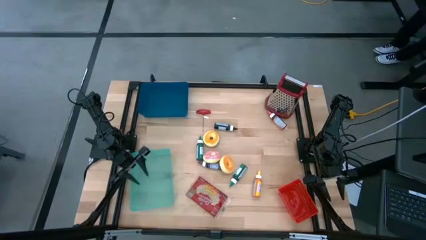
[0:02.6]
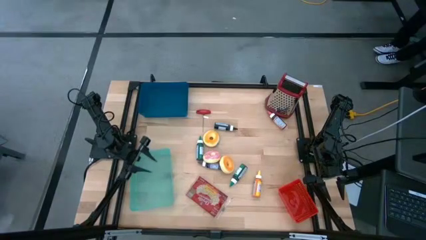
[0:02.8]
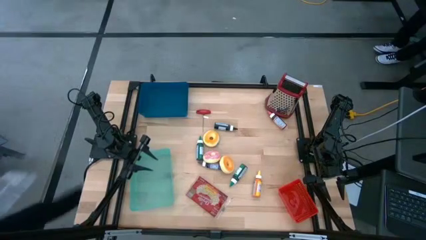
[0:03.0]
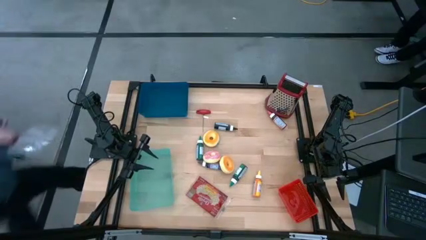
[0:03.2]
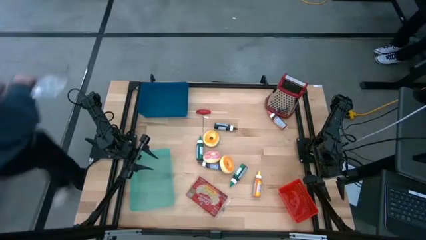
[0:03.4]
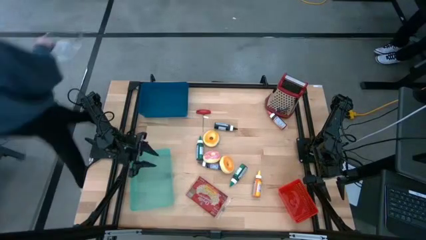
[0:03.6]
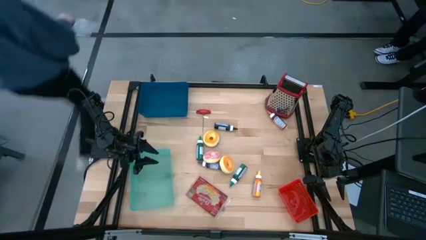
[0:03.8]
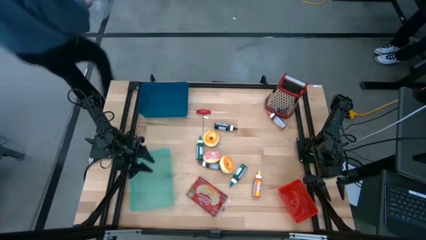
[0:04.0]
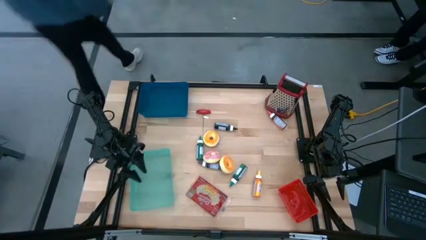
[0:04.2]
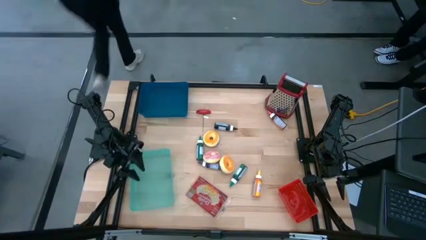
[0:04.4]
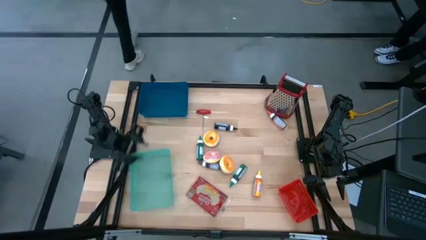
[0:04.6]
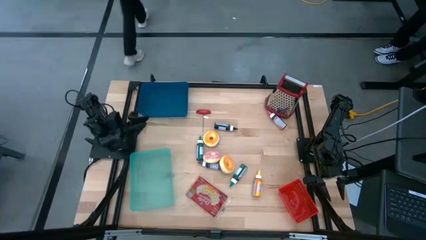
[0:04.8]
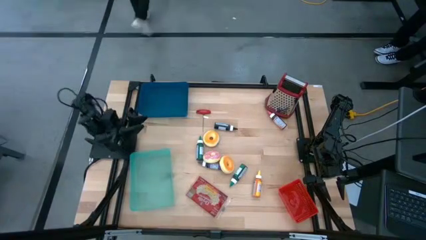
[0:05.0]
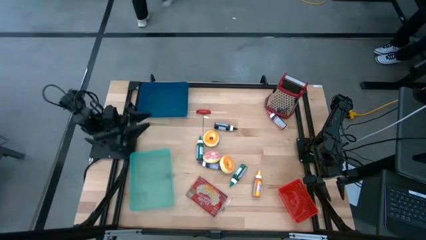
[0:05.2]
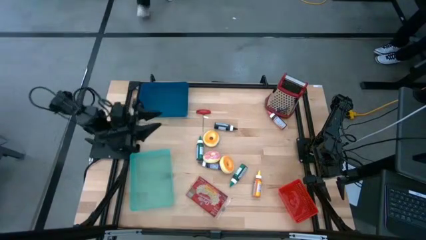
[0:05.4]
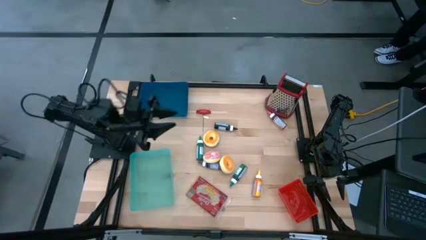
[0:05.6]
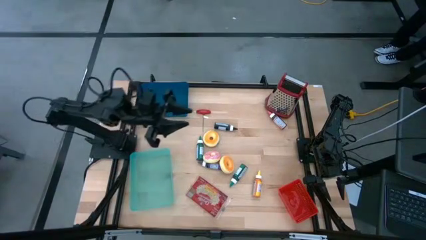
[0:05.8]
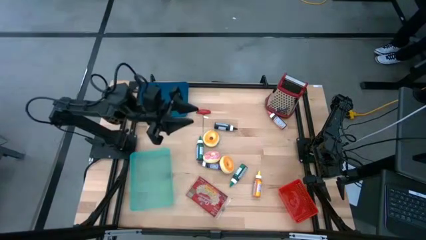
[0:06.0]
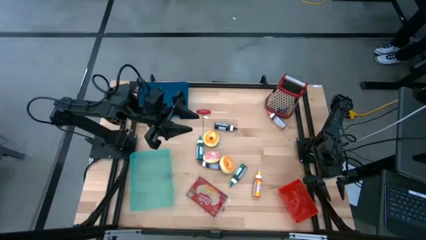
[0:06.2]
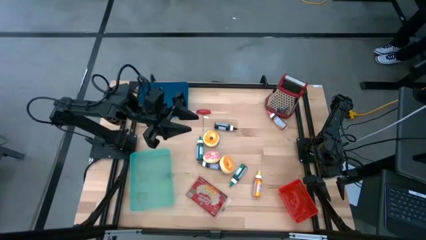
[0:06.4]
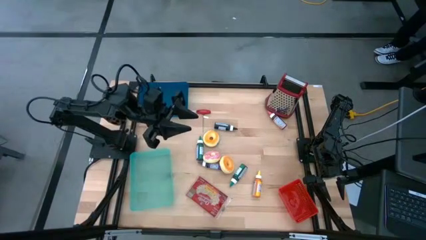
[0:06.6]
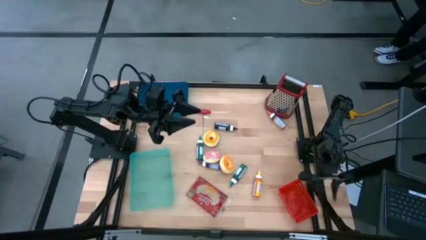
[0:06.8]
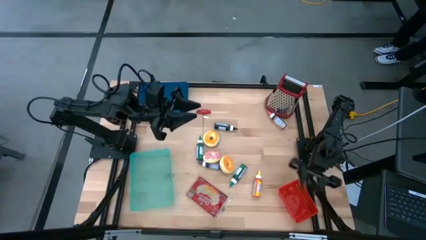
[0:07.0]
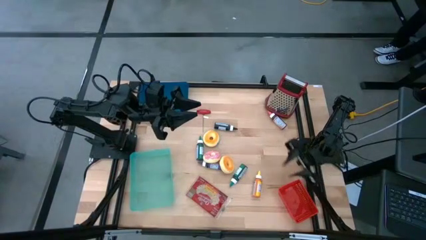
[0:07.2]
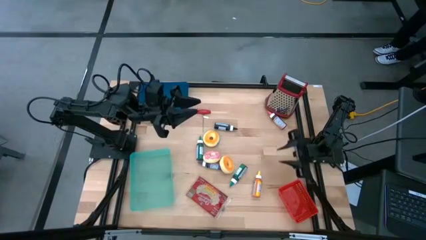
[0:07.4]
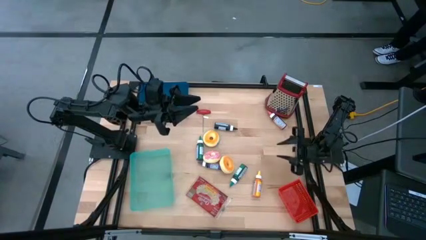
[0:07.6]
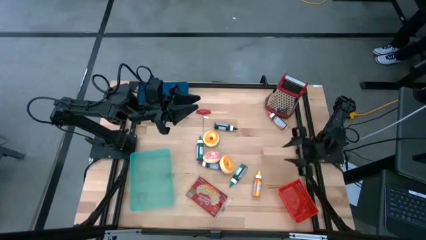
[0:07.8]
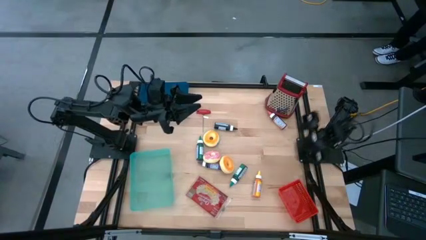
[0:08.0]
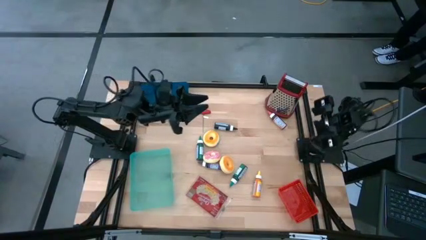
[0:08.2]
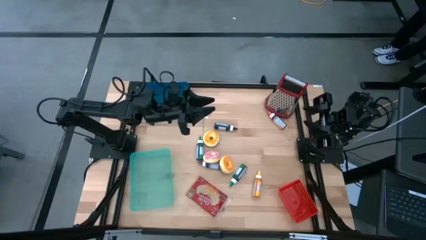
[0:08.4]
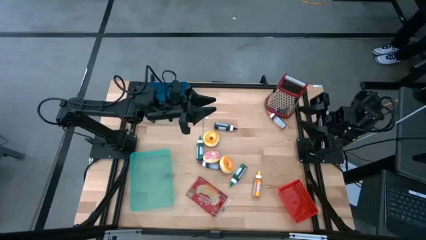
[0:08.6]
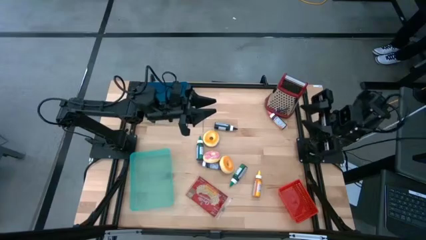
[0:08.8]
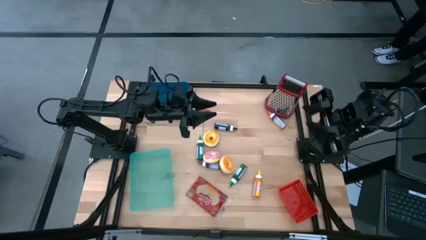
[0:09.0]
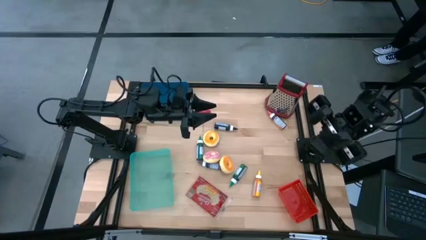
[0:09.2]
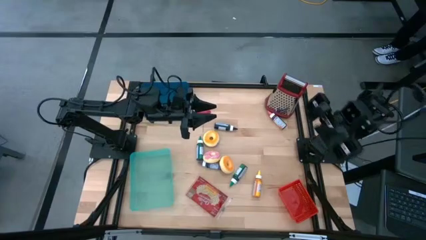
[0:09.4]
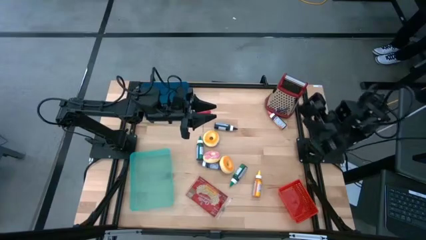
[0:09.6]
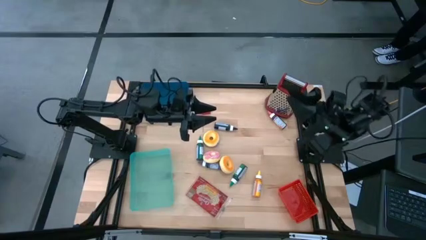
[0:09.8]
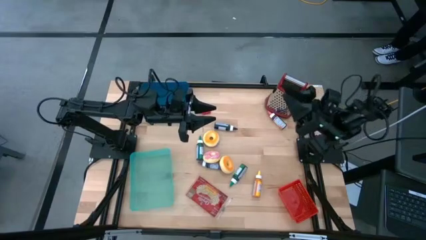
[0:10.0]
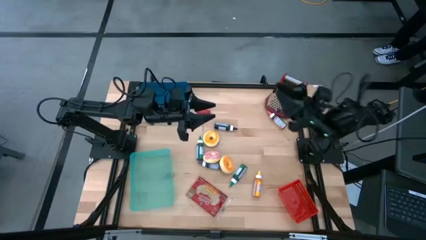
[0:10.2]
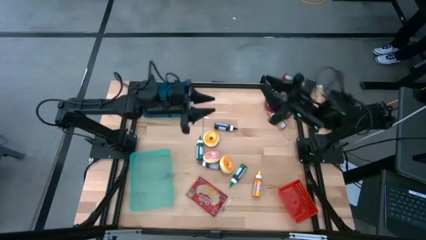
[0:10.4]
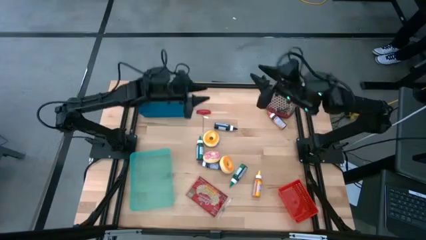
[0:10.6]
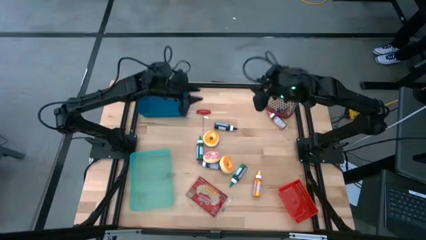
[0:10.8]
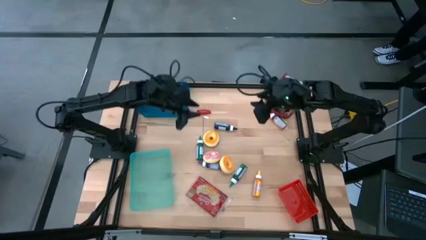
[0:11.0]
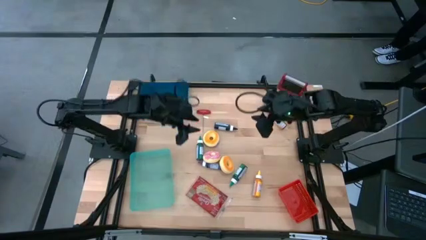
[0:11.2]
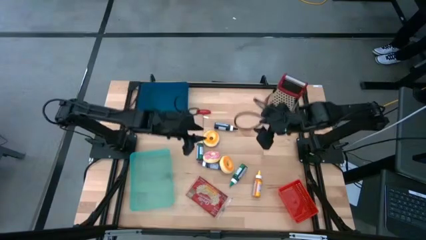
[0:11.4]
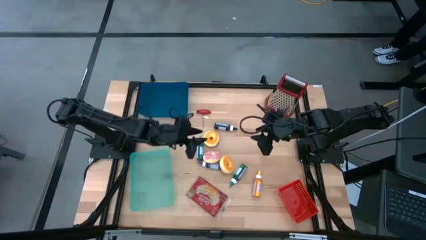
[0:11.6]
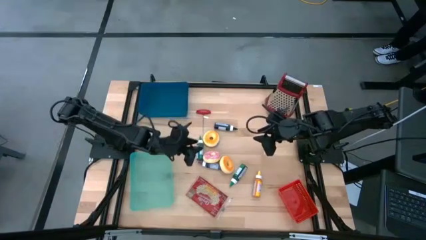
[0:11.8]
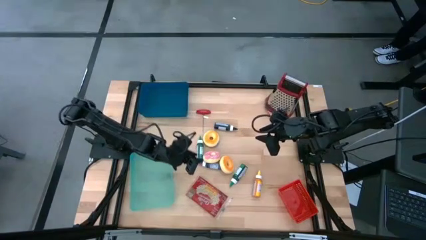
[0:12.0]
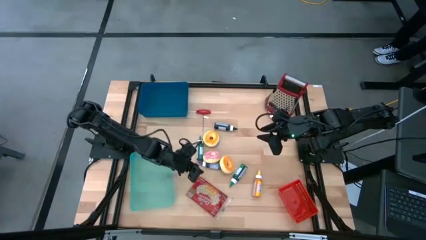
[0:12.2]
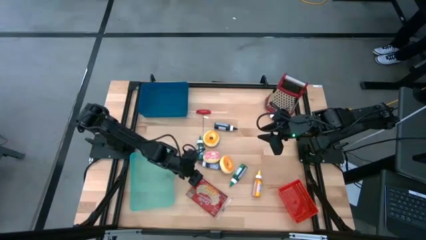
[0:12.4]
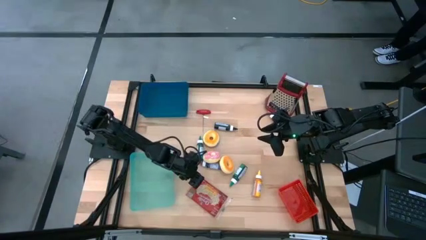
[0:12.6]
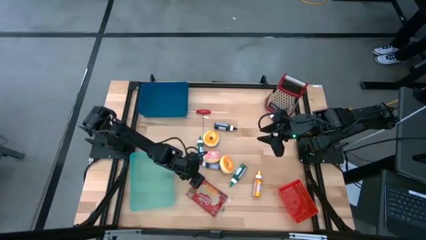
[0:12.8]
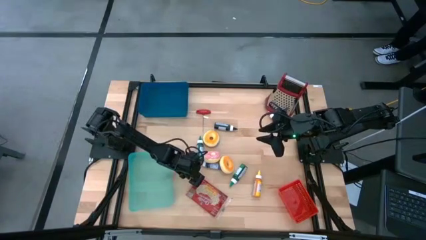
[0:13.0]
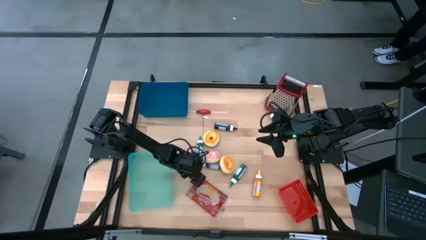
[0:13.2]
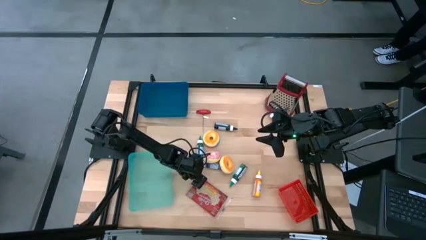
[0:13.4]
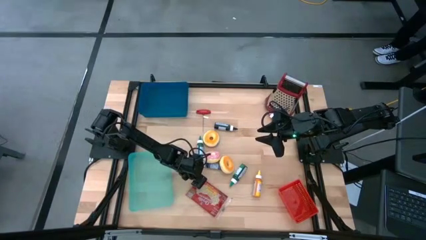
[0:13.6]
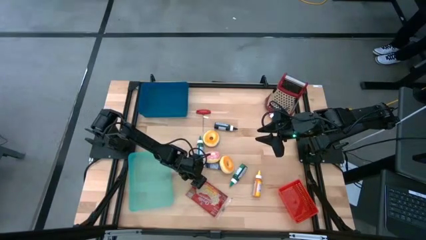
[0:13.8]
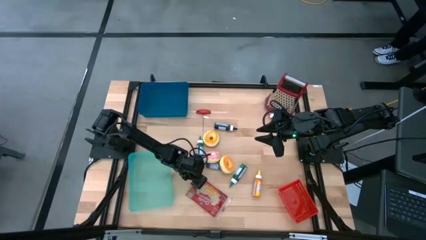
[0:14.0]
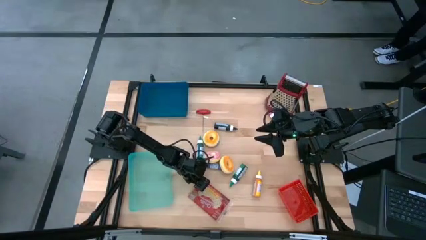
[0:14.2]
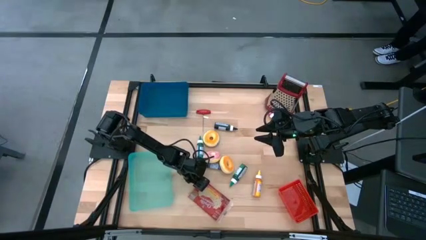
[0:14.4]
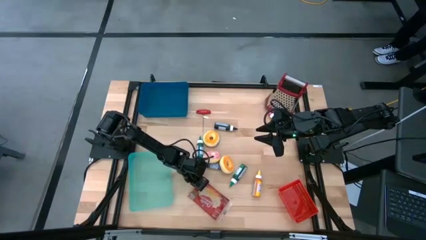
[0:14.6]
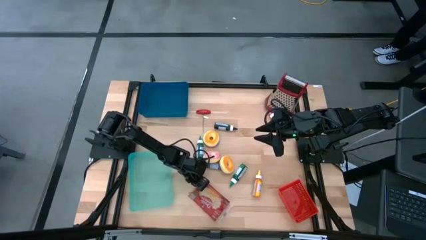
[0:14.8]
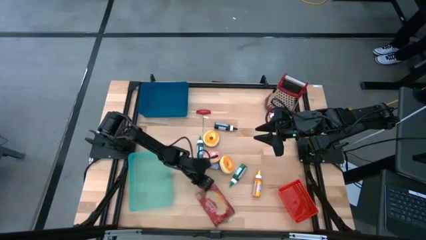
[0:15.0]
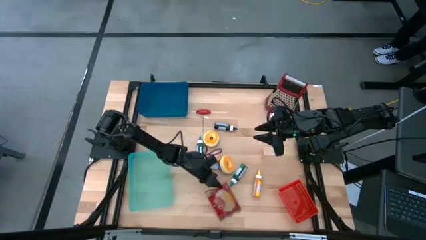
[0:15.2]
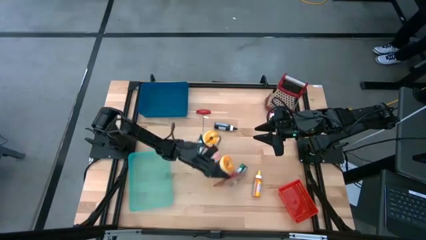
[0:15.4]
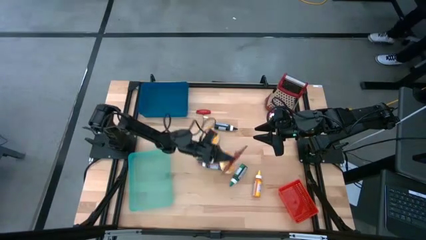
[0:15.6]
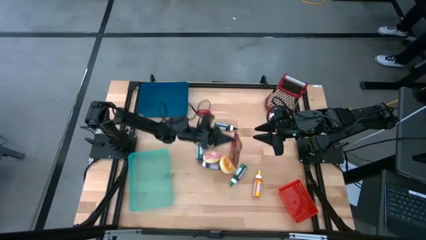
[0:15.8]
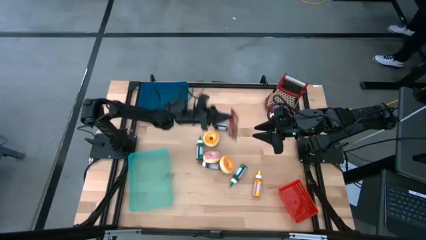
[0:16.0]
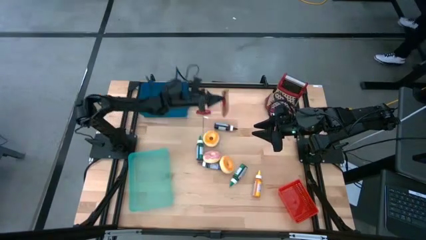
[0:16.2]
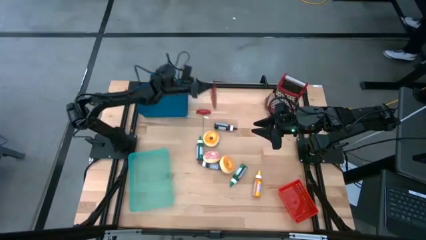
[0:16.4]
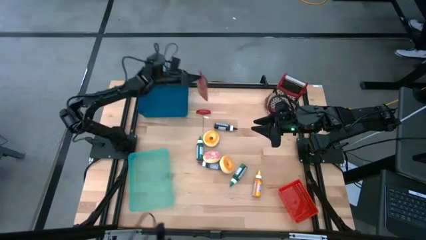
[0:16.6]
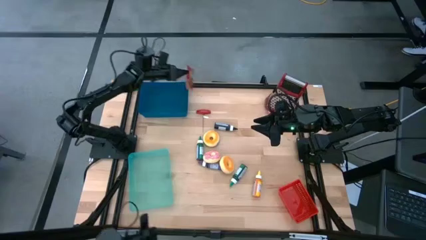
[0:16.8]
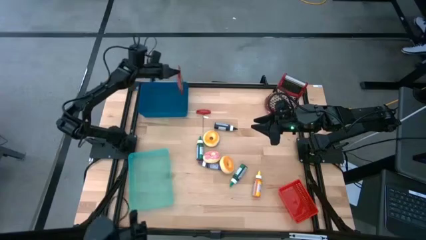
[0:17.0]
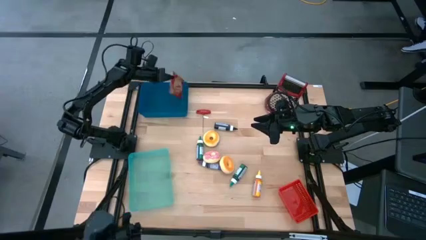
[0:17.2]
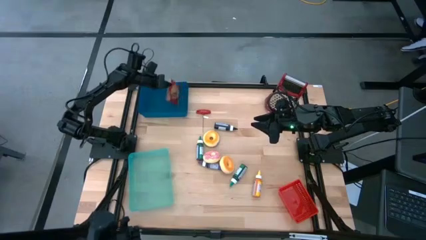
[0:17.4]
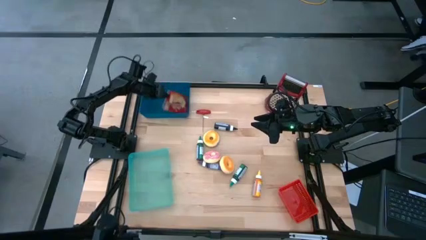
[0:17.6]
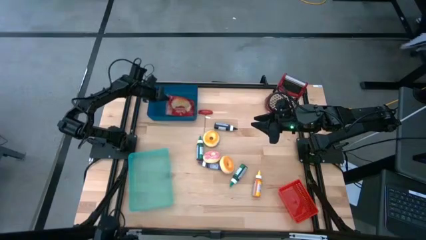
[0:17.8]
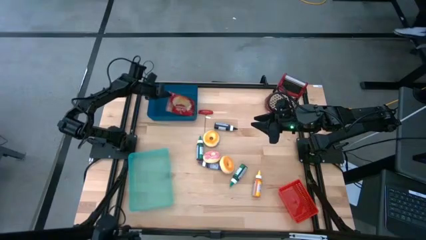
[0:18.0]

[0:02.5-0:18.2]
Put the red popcorn bag into the blue bin
